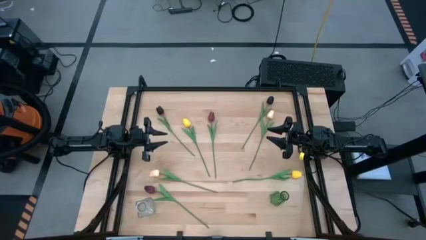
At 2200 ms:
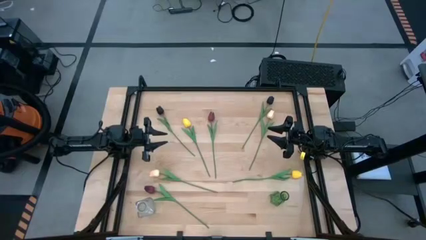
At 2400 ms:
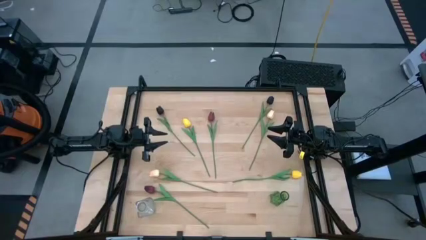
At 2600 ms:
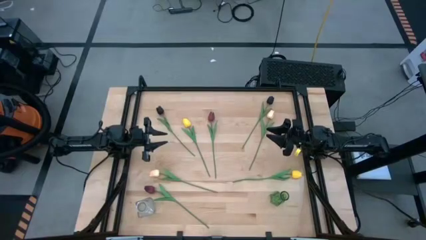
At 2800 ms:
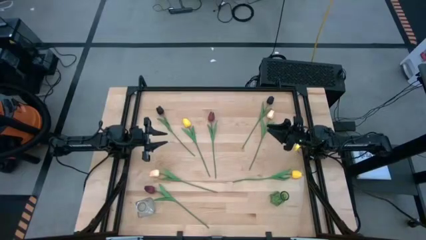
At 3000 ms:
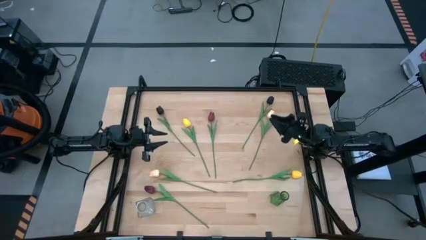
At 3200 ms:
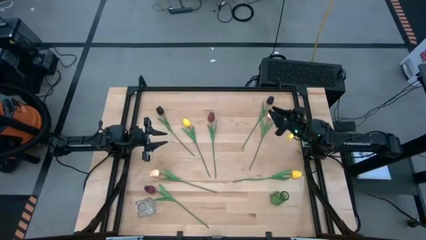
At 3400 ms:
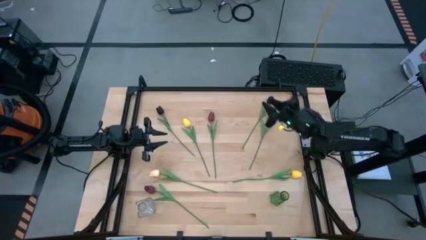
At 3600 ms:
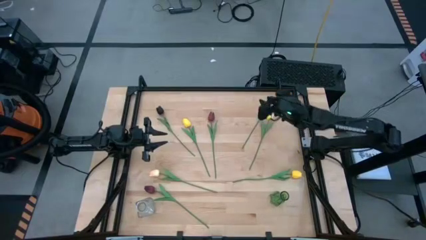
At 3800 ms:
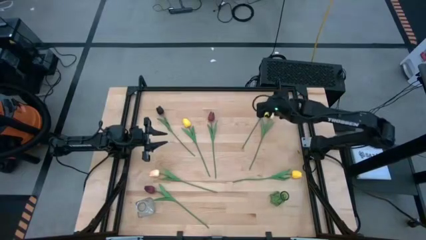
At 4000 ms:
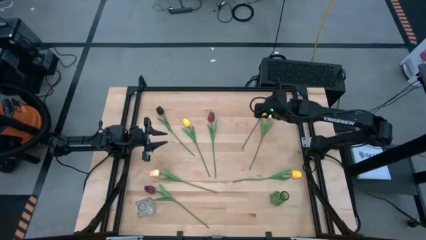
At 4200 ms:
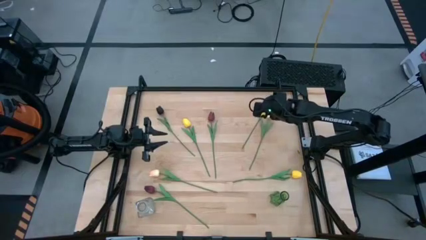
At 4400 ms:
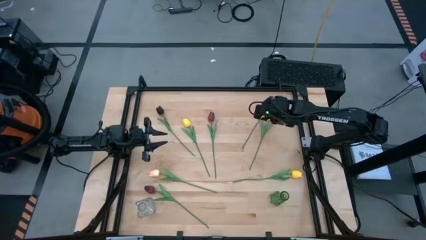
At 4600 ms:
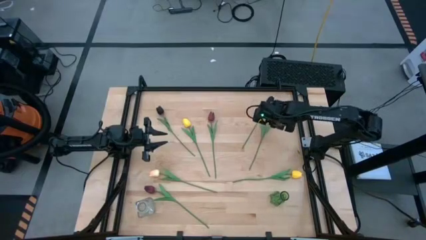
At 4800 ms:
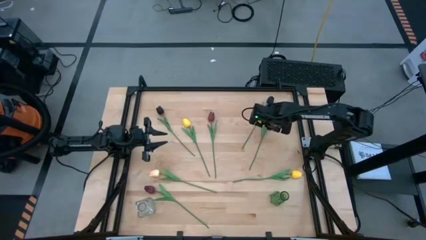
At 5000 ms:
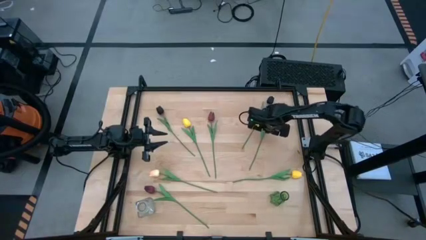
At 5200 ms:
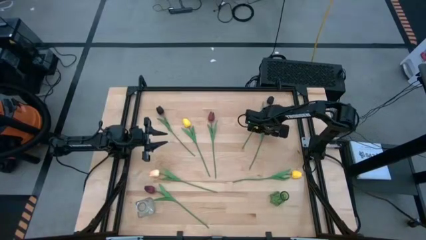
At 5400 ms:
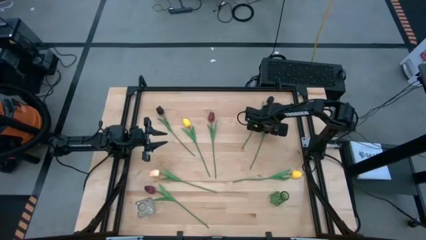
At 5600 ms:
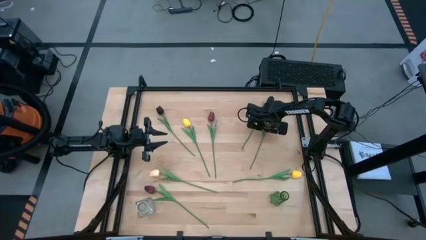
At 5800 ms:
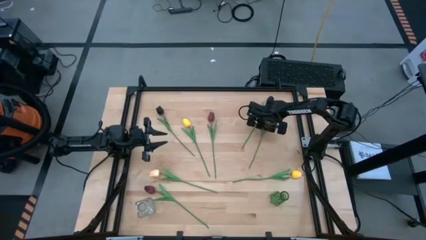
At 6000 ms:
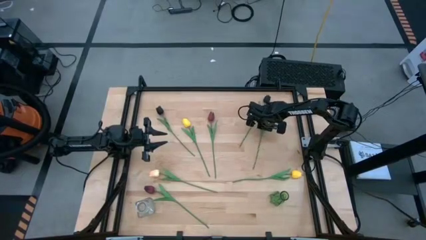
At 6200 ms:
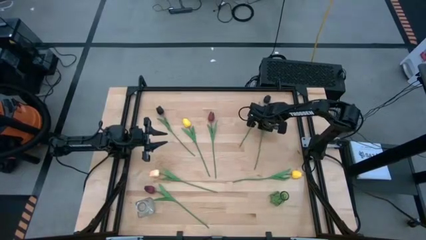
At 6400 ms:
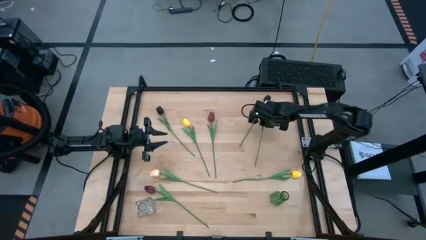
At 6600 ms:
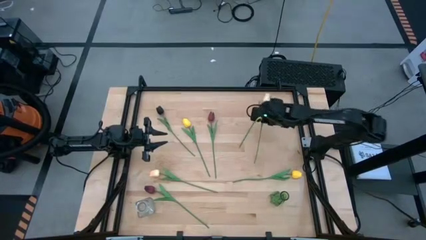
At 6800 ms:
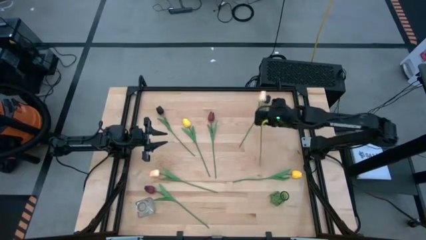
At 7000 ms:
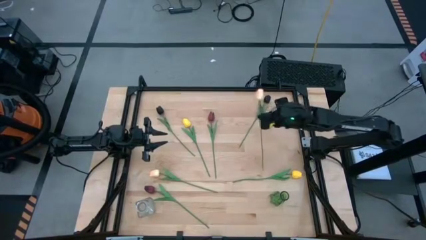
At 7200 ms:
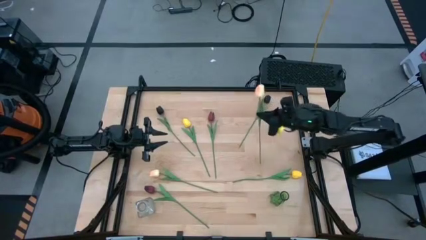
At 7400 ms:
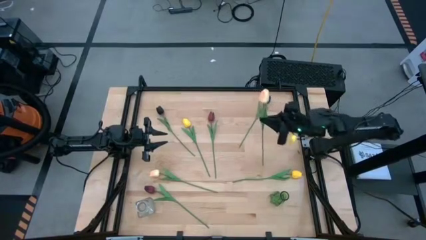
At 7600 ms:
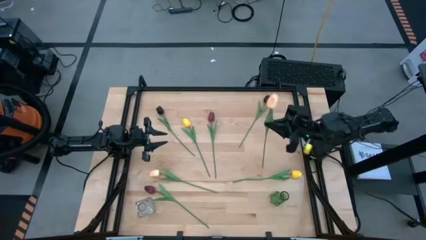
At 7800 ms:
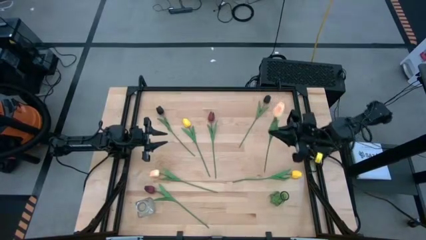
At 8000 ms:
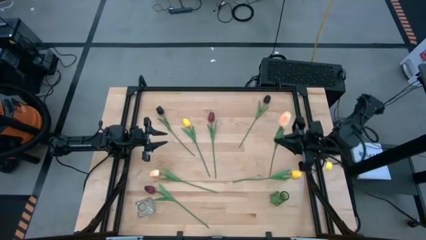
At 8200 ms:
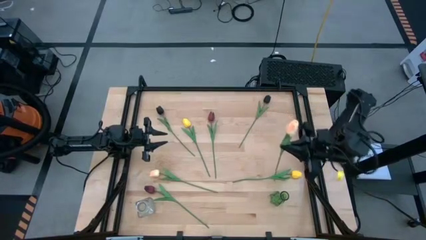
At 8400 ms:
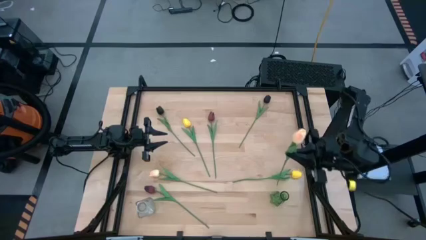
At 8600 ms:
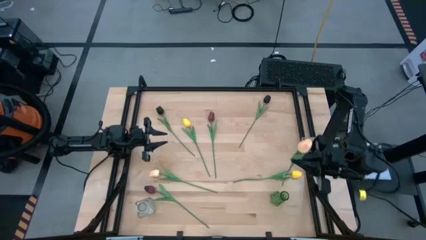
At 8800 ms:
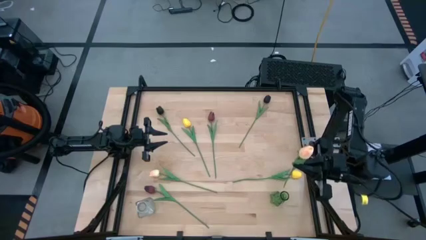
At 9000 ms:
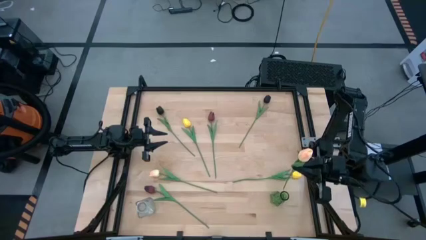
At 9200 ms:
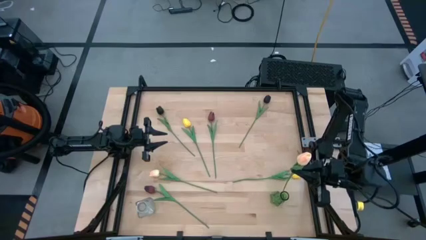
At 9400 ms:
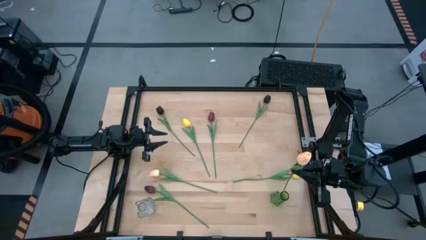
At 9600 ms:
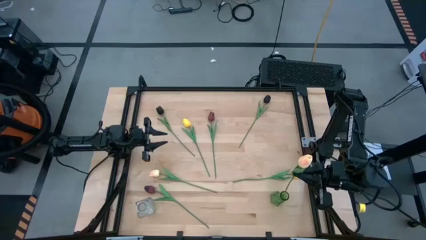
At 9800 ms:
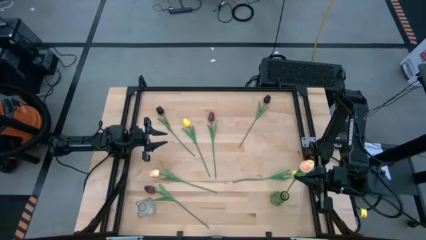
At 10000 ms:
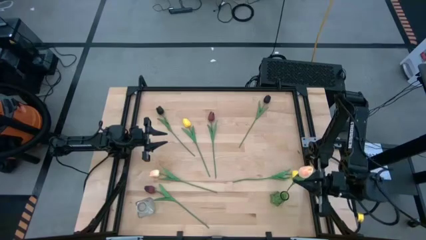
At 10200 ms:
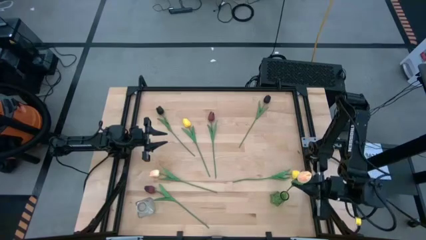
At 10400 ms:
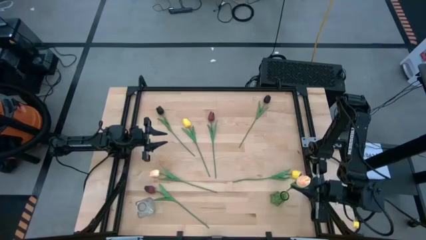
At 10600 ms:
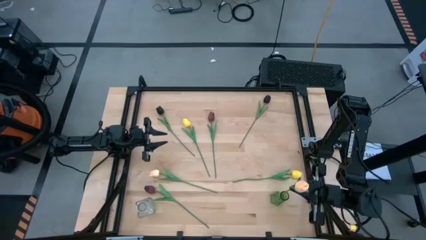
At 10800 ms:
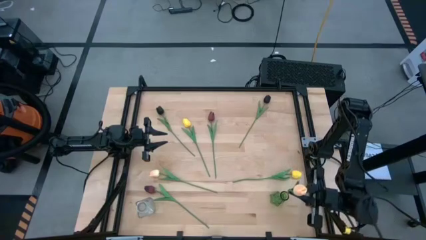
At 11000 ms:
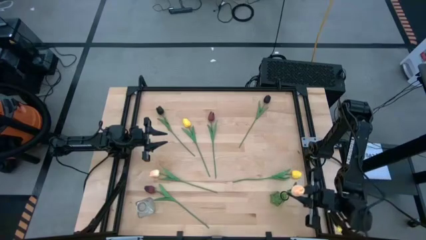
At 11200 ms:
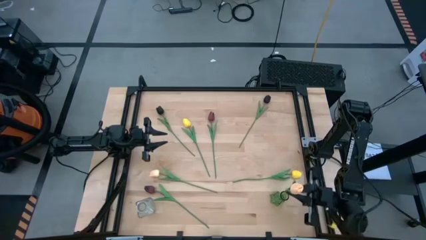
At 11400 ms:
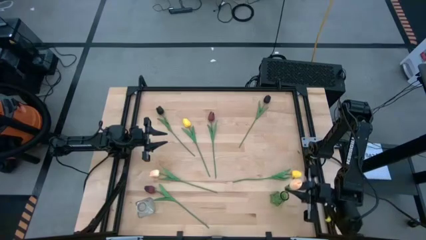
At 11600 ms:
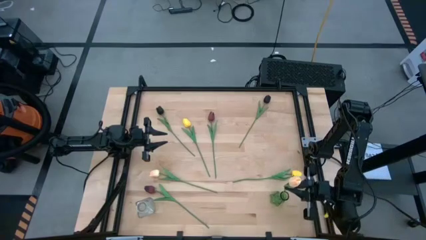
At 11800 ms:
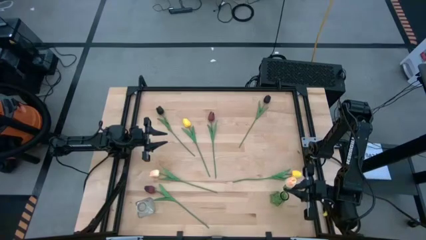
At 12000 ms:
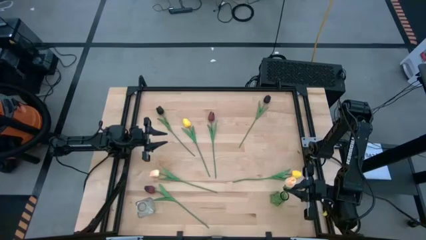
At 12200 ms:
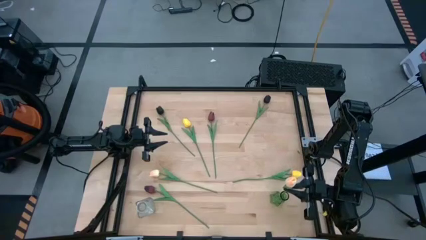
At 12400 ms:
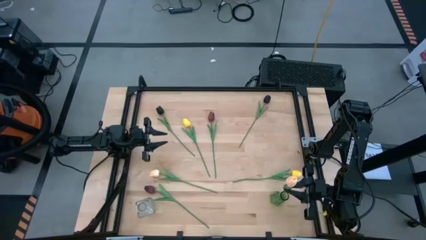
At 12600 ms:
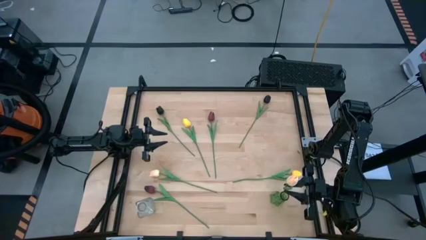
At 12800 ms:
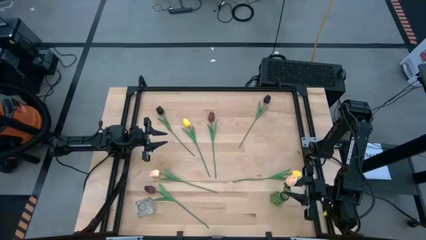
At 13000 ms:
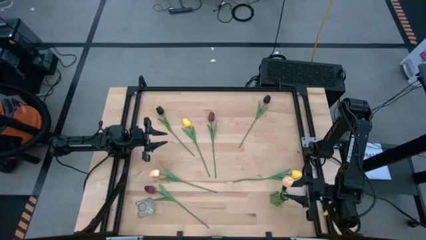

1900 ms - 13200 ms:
Task: Sort flowers into vase by color
Put the top pink tulip into the green vase

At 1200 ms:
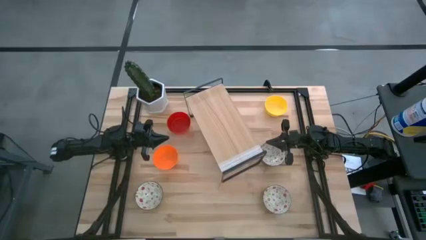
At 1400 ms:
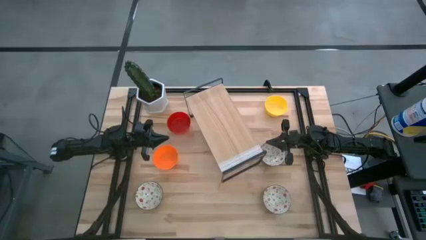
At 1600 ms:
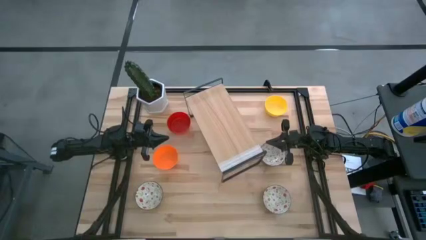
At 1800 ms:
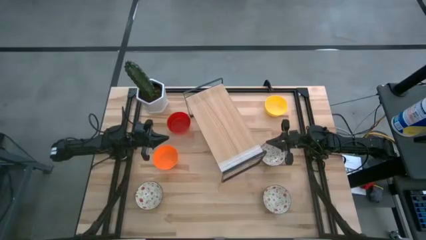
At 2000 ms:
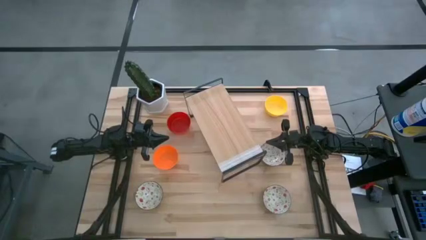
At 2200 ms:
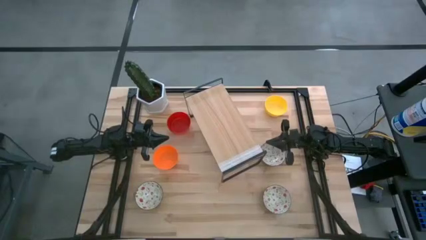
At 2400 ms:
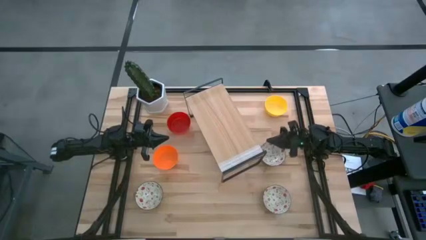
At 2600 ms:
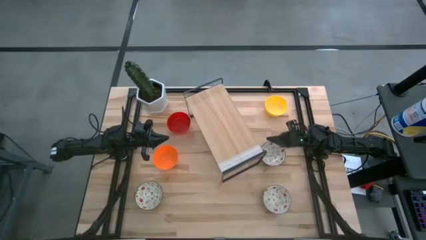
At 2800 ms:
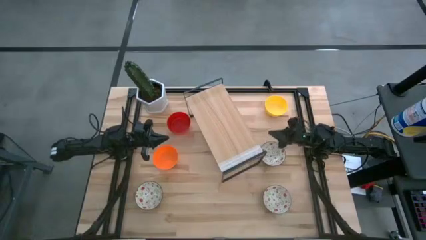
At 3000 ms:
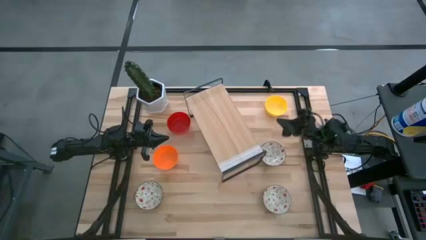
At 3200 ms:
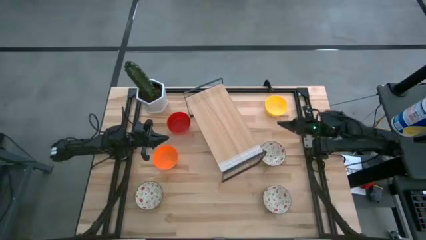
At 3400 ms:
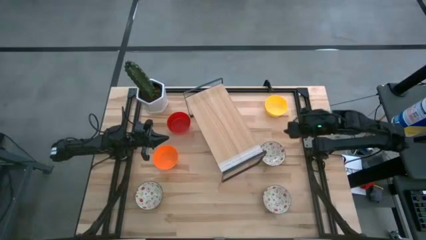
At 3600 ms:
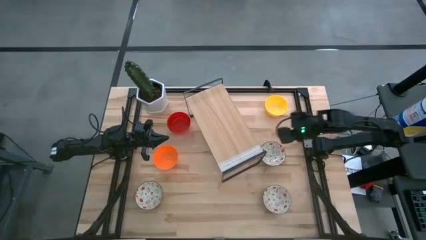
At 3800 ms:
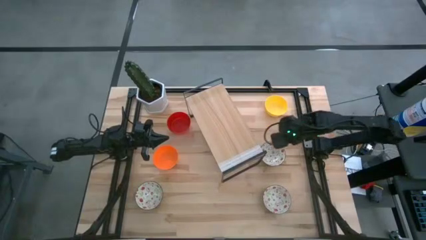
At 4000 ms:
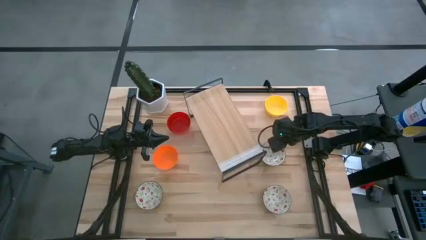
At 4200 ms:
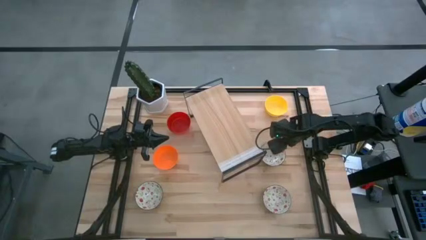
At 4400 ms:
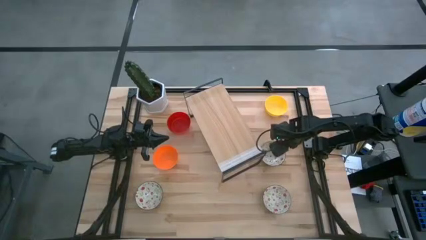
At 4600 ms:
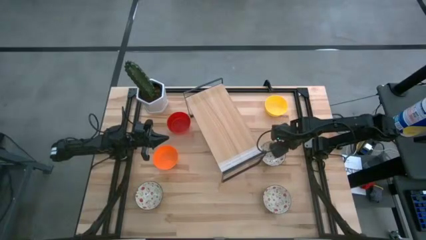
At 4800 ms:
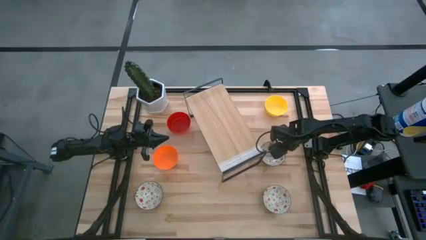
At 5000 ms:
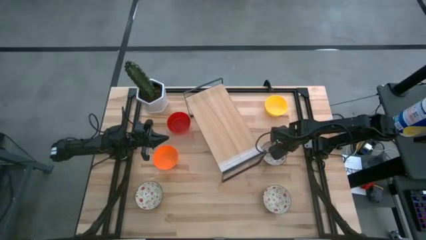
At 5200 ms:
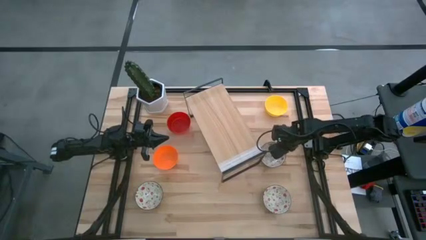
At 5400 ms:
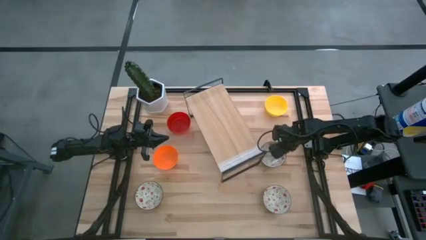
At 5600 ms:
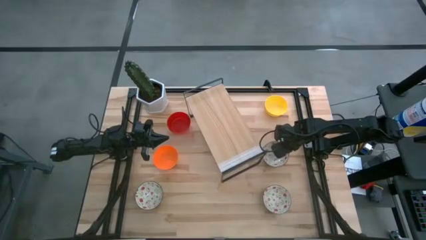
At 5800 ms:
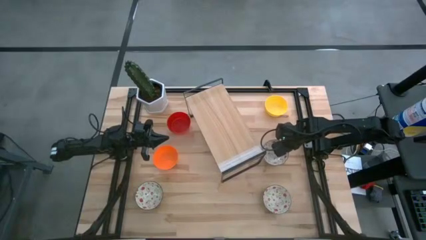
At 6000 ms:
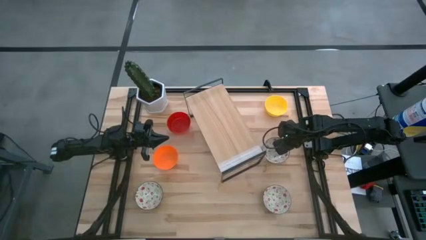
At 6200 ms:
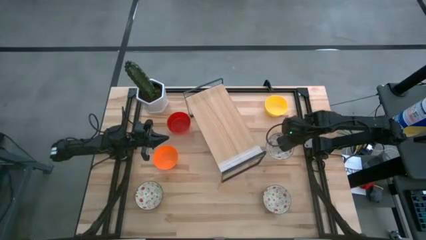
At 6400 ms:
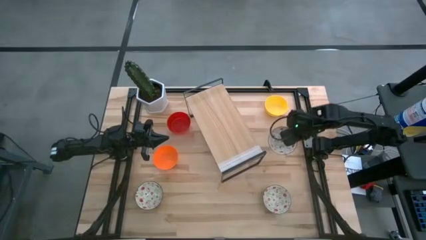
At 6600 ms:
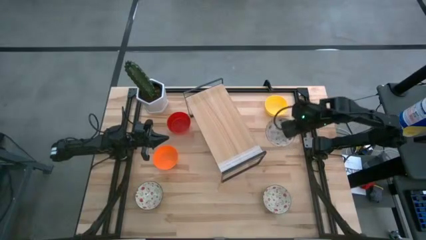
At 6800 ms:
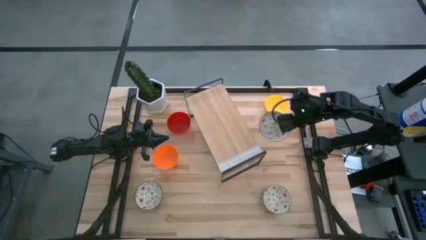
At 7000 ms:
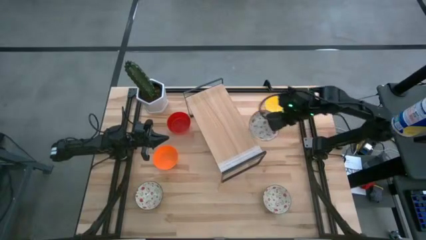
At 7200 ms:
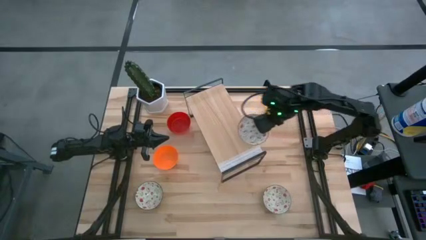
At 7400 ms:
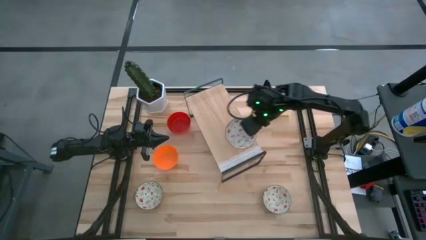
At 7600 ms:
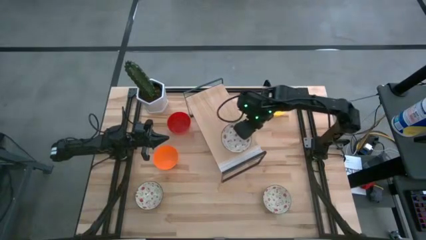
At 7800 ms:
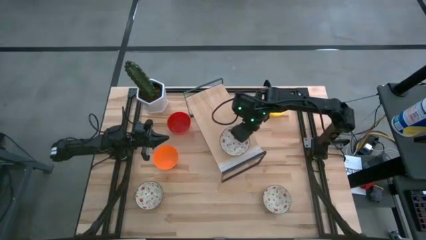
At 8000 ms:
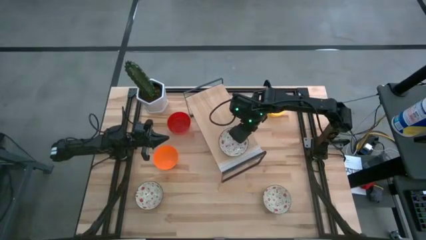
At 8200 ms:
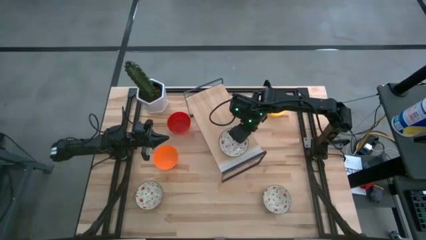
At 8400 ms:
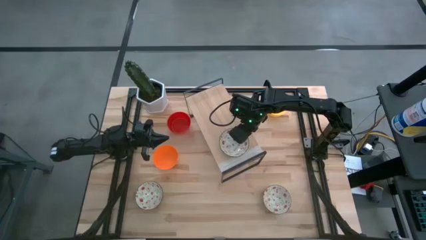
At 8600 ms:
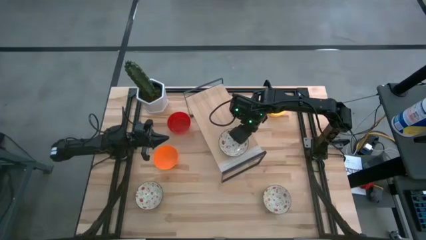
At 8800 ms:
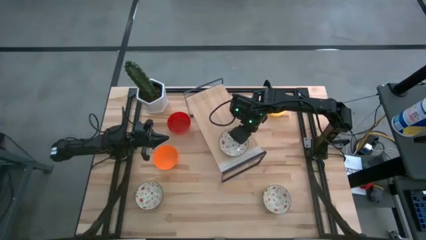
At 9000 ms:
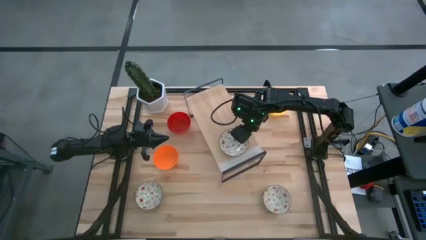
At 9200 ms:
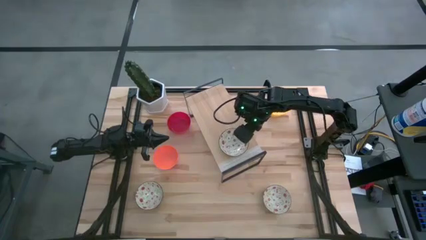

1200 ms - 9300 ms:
Task: Pick & Place Mini bowls
Put the top right white patterned bowl on the shelf
